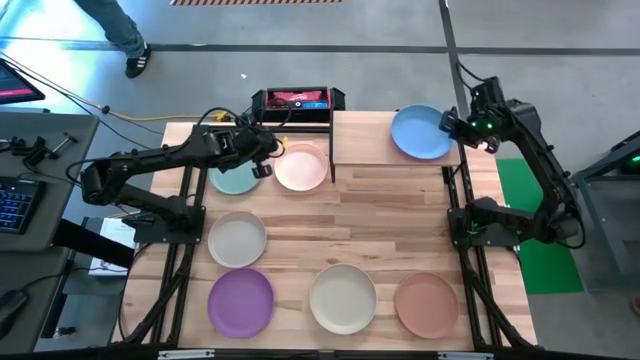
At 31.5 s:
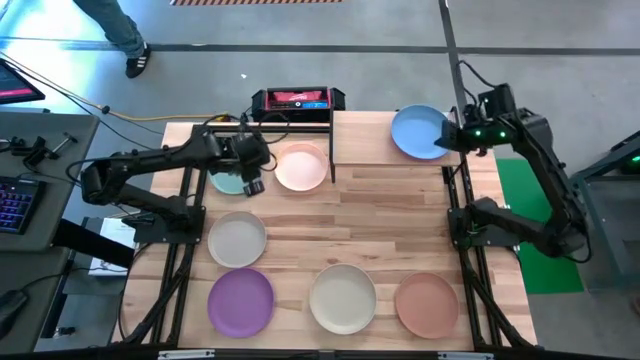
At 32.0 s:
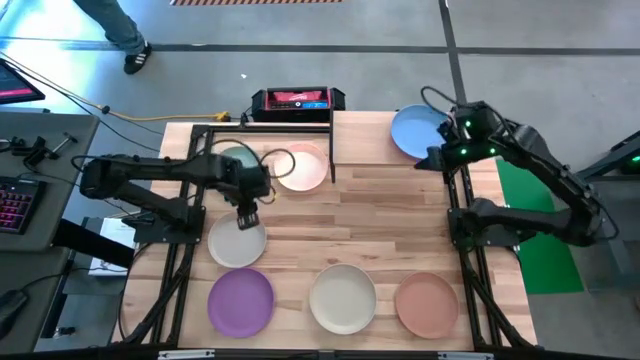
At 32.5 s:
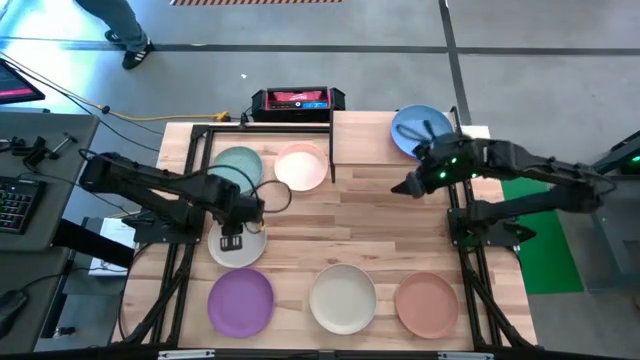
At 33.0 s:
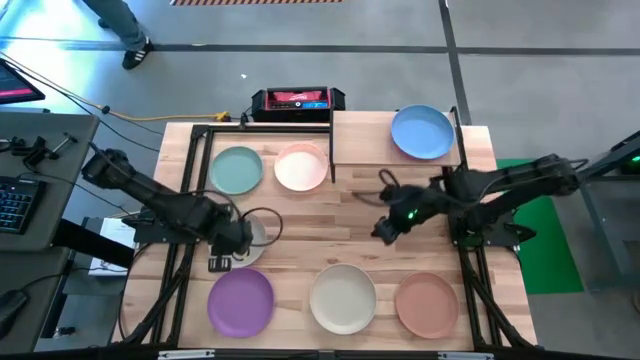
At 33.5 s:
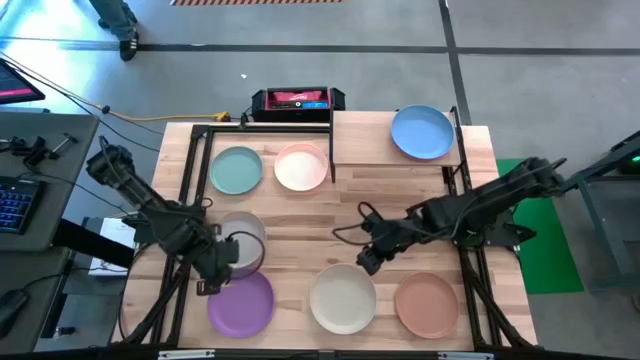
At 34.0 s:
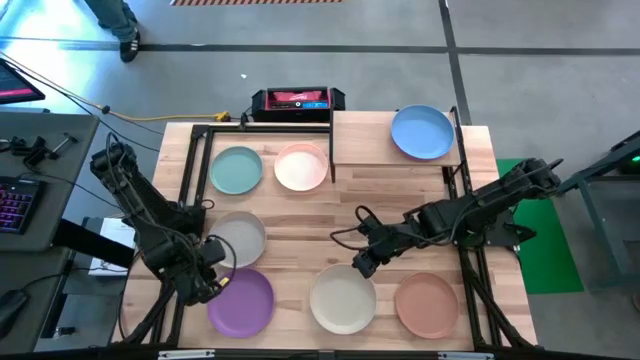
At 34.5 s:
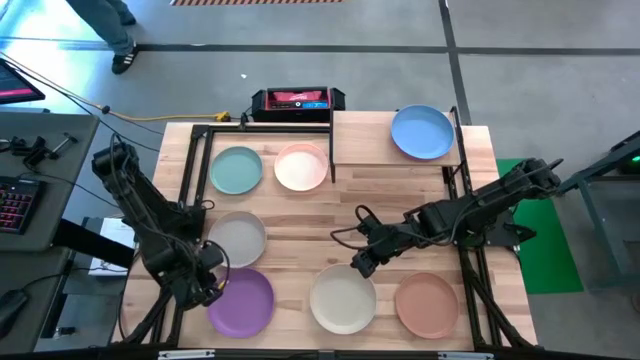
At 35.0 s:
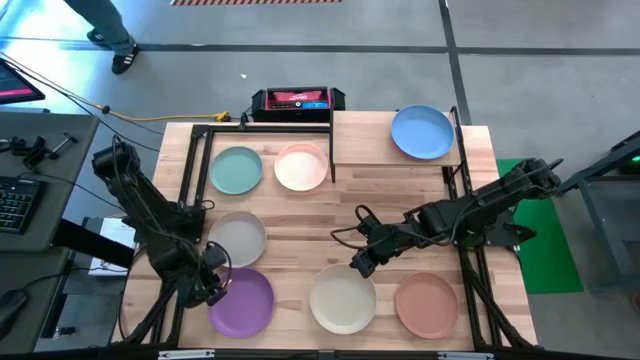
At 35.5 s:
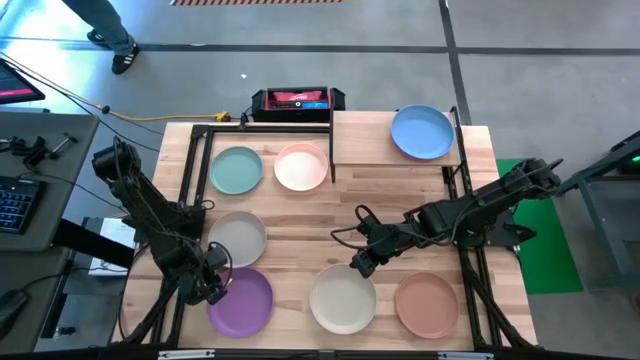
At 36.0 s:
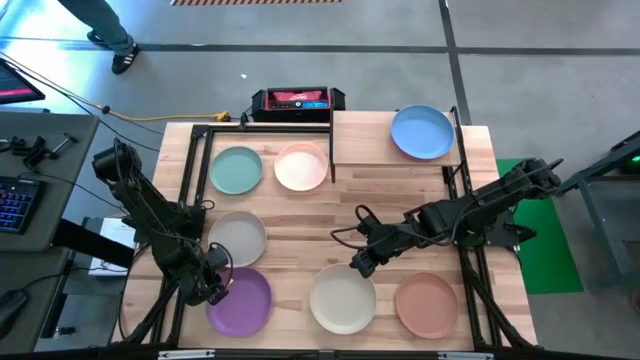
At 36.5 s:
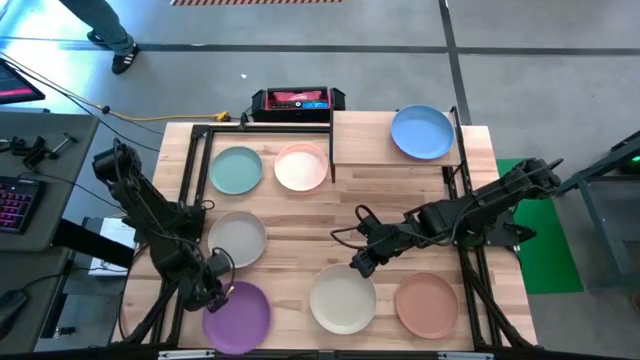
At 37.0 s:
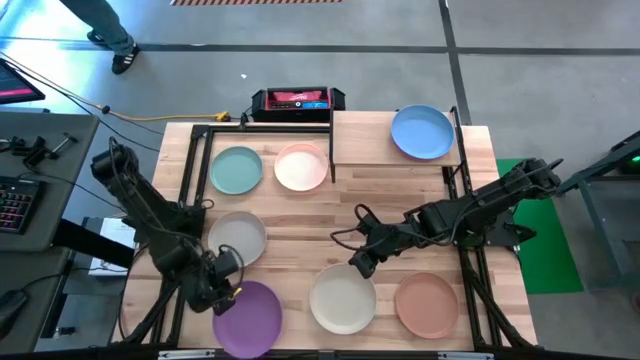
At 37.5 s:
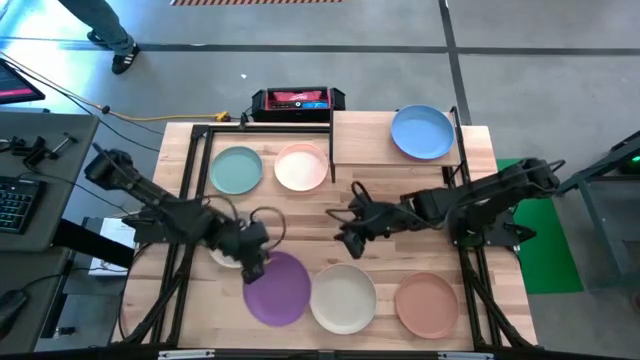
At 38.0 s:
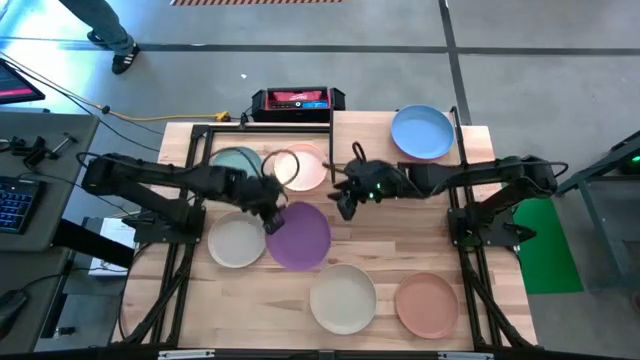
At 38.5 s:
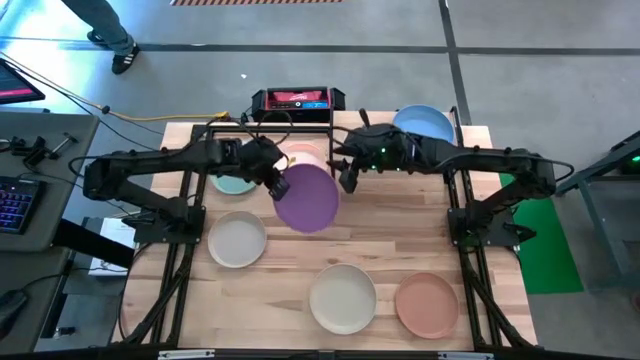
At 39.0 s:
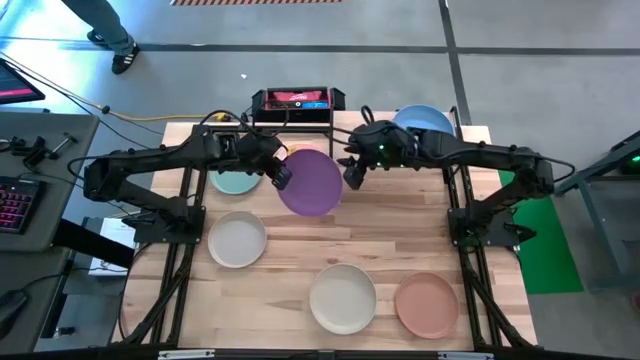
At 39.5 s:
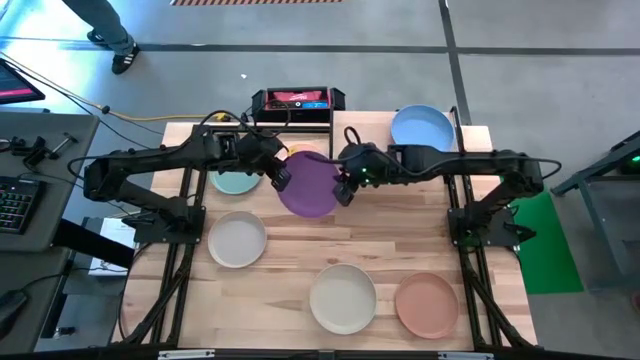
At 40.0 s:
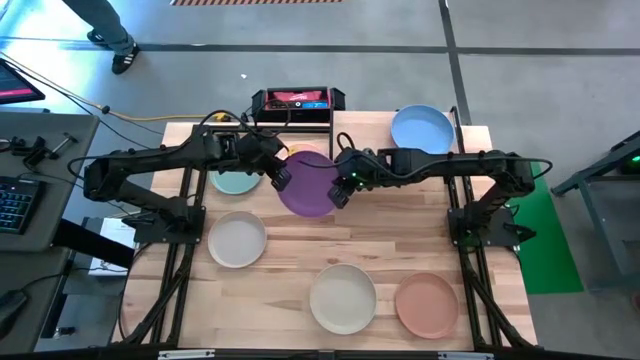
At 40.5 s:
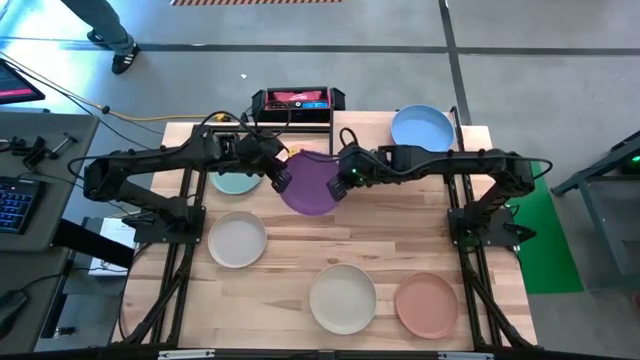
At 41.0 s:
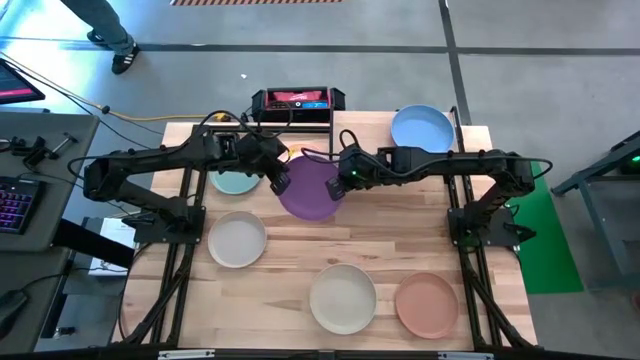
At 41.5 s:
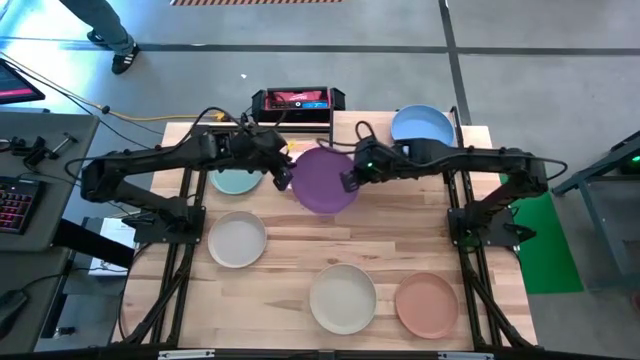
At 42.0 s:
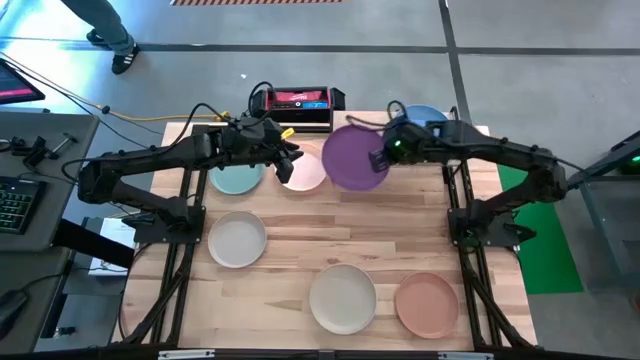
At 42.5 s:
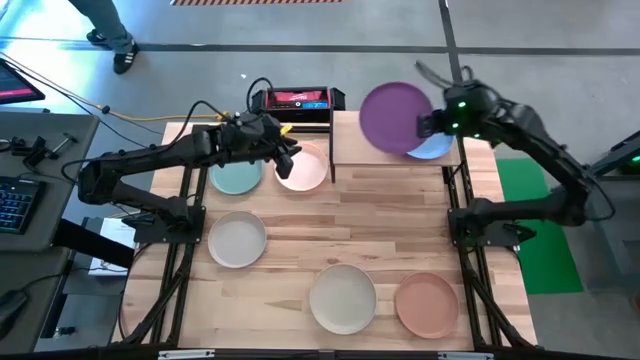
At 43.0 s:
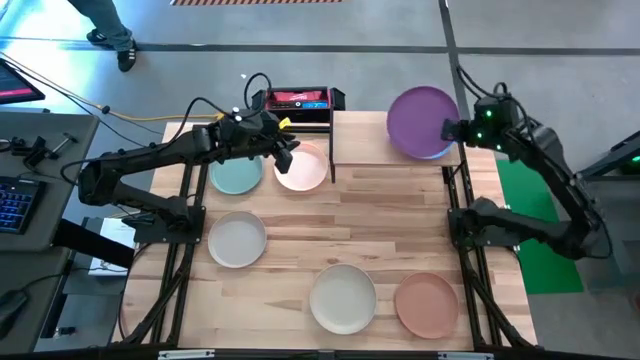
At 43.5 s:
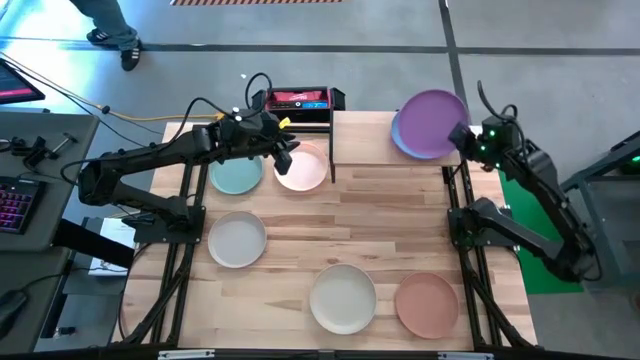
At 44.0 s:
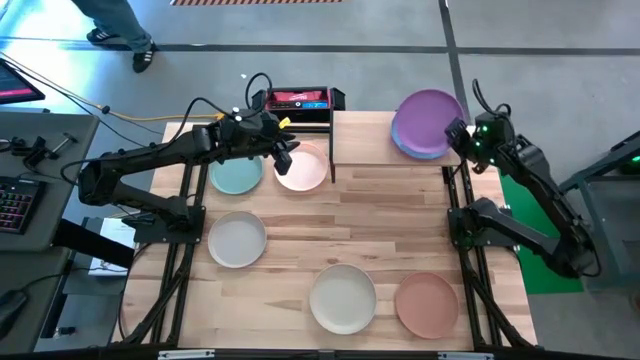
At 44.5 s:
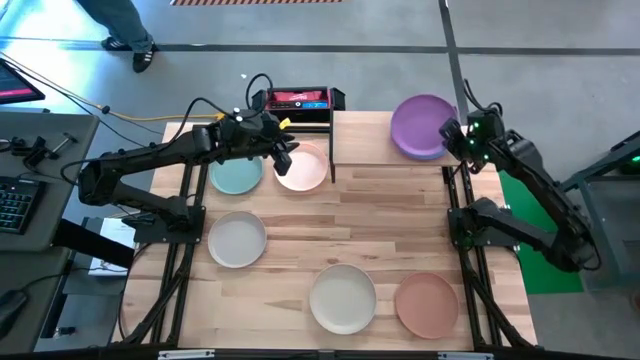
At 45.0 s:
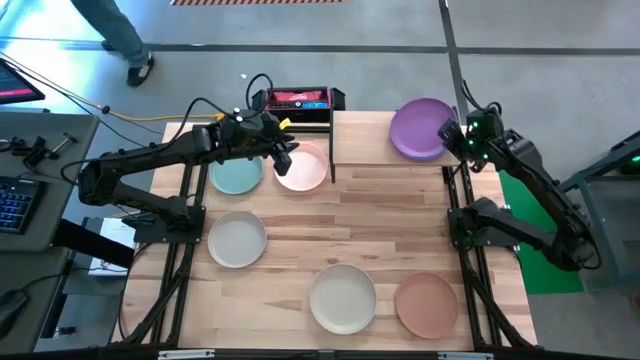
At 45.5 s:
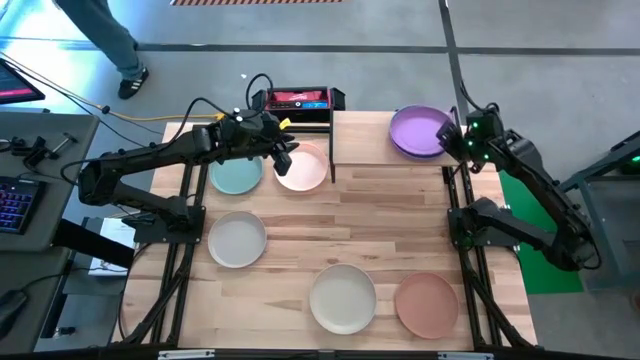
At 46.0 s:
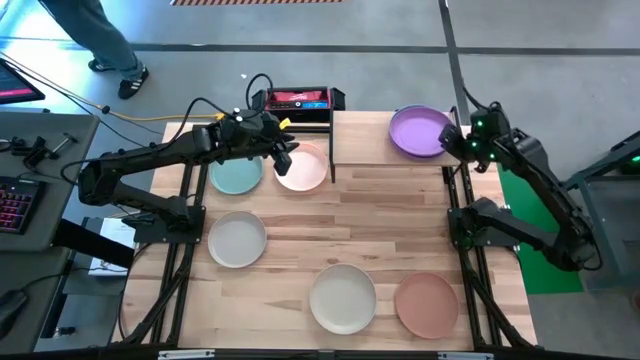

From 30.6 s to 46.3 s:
Task: Place and stack plates onto a shelf
Stack the purple plate on top of the blue plate on the shelf

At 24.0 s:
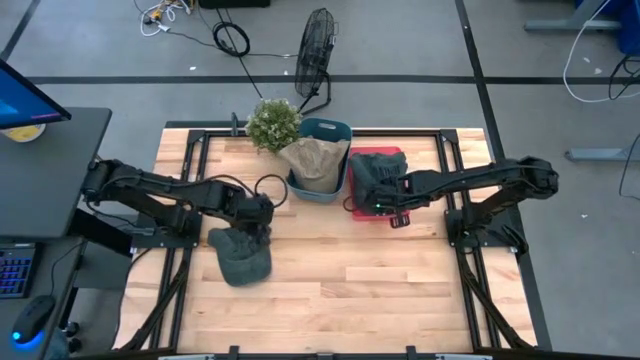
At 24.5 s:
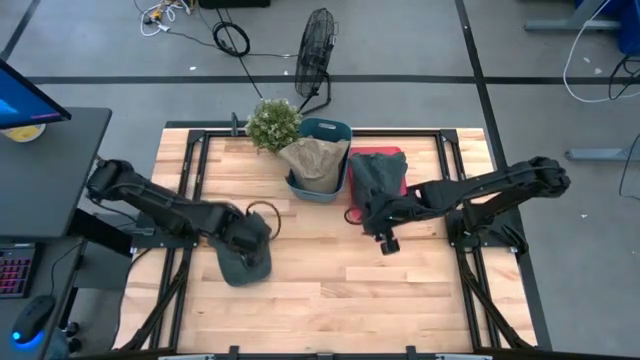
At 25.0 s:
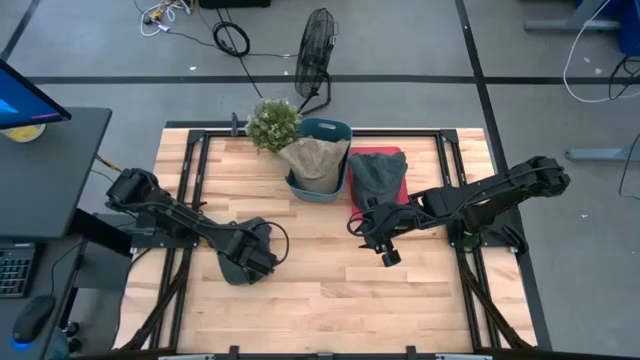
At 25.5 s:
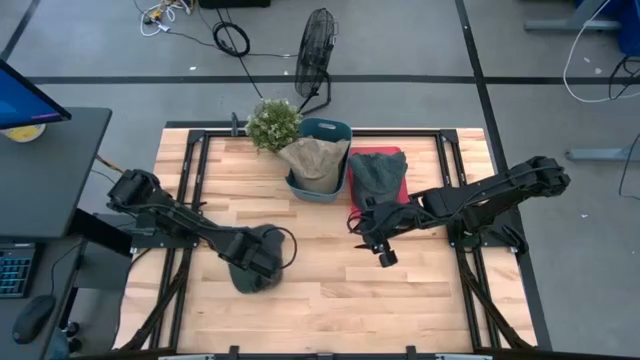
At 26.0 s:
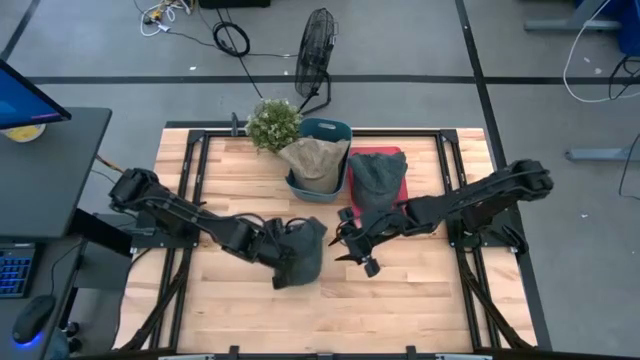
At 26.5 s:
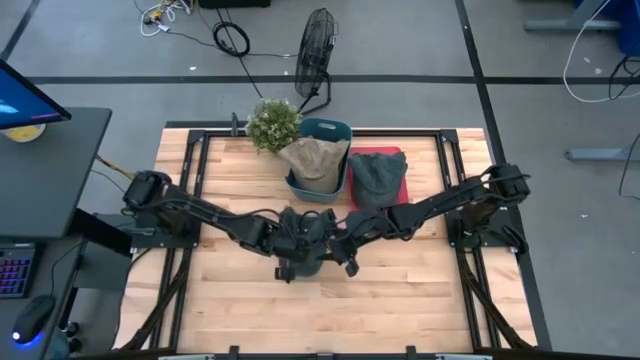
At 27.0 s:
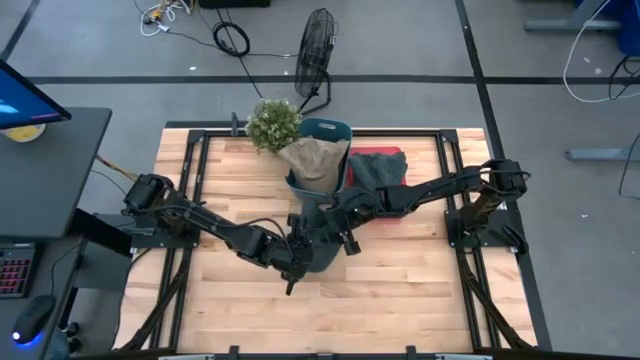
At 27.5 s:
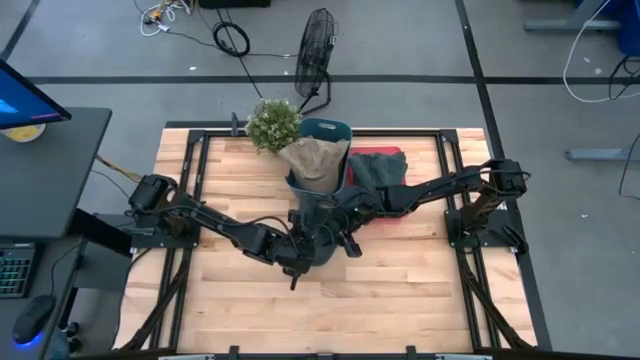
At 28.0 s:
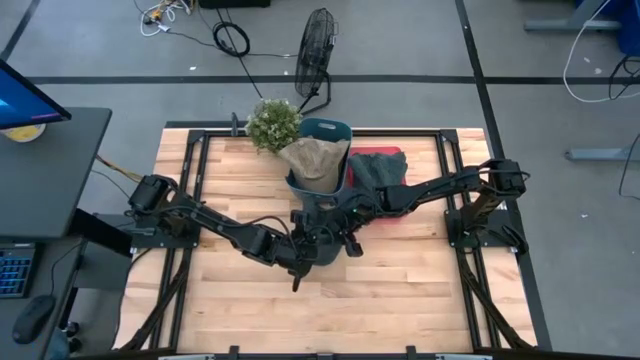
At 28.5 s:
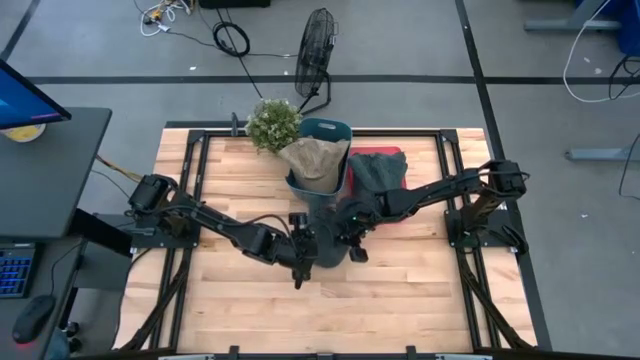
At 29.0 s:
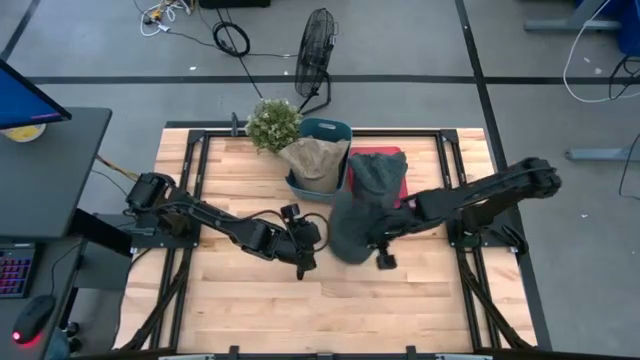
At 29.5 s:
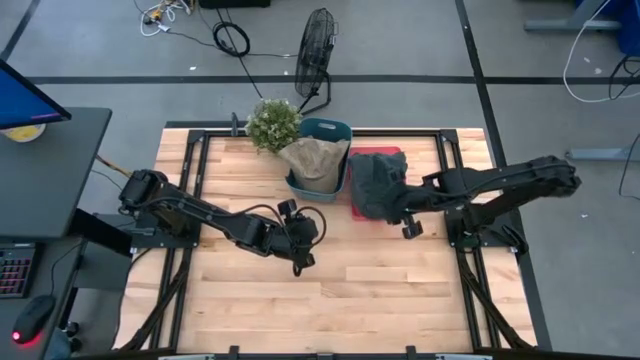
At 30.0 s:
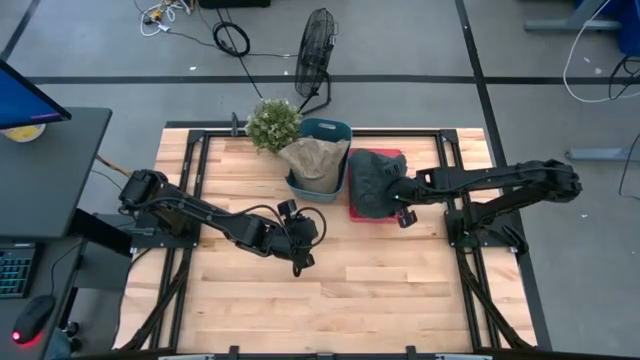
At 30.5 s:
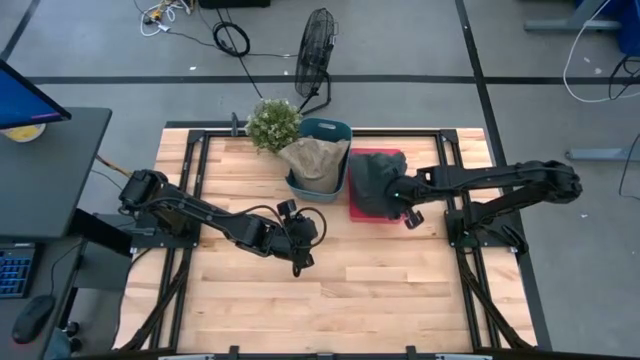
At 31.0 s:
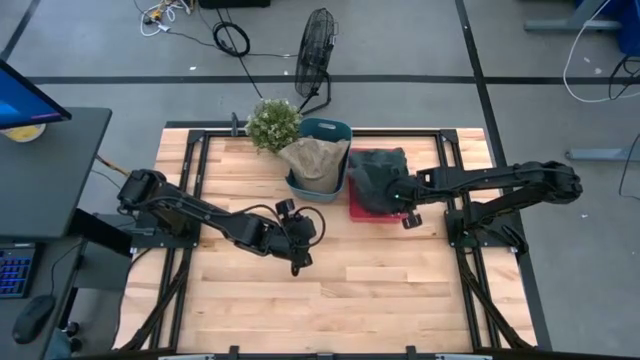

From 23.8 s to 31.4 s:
Task: Pick & Place hat
Put the gray cap into the red bin
